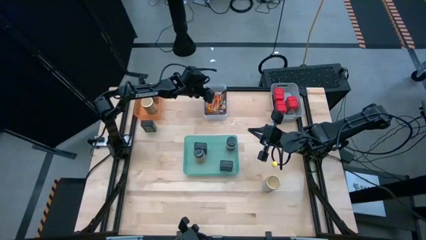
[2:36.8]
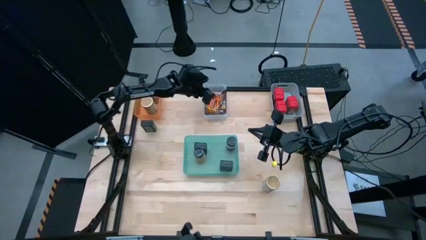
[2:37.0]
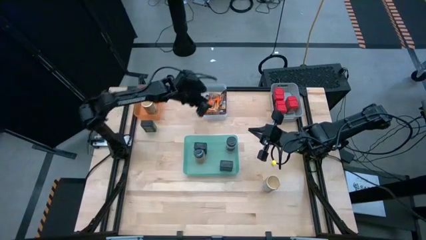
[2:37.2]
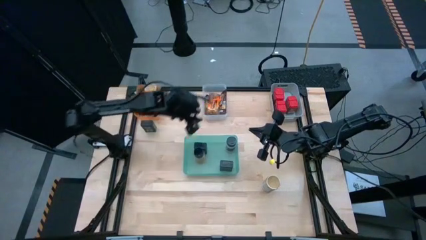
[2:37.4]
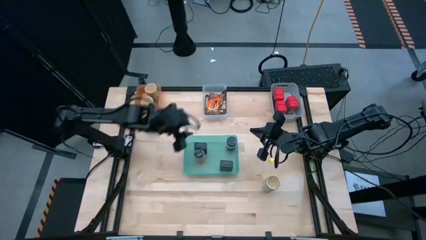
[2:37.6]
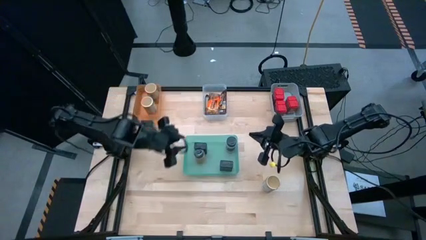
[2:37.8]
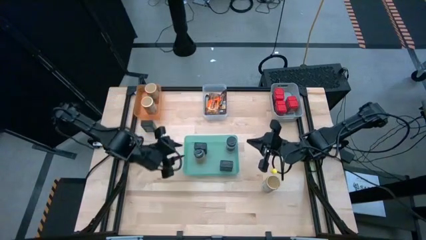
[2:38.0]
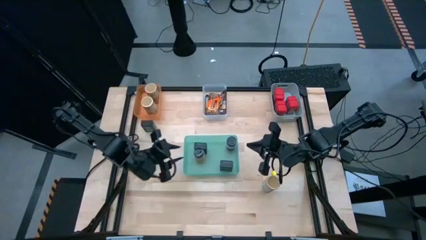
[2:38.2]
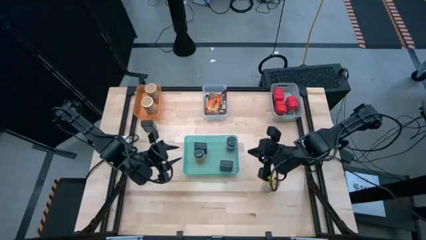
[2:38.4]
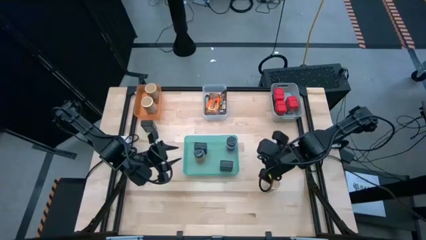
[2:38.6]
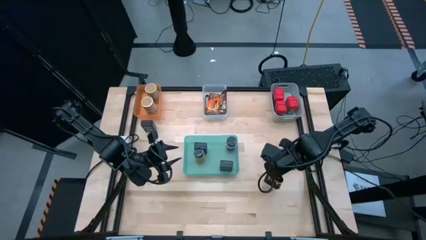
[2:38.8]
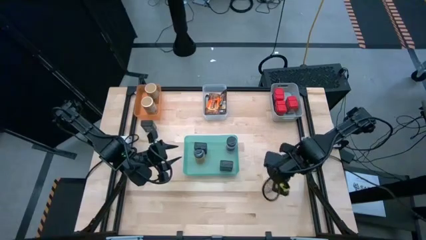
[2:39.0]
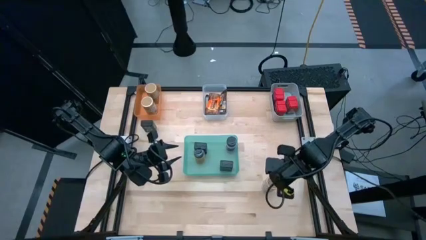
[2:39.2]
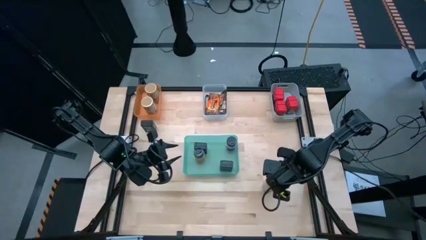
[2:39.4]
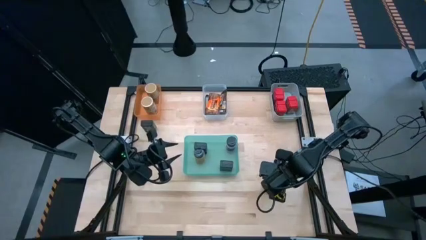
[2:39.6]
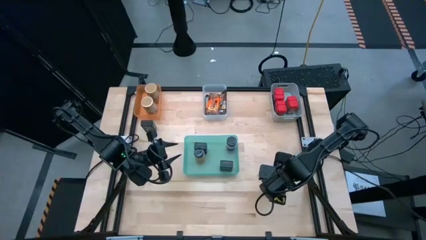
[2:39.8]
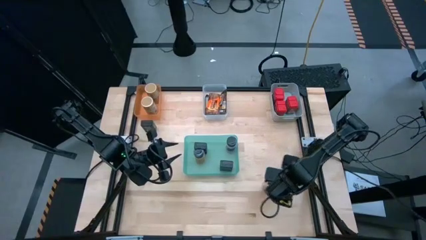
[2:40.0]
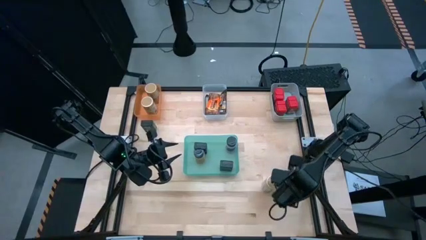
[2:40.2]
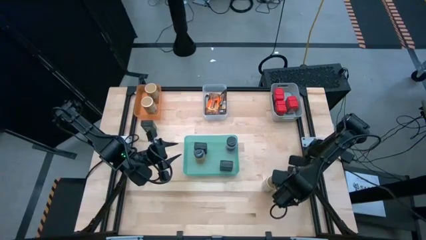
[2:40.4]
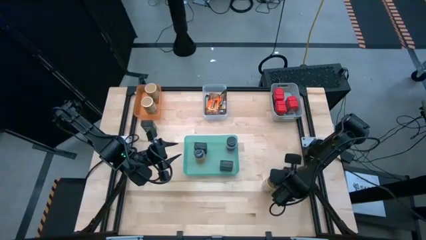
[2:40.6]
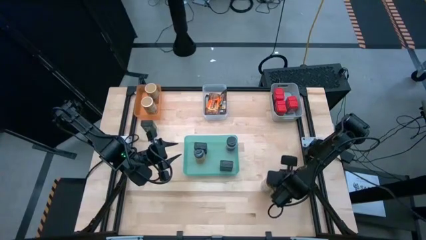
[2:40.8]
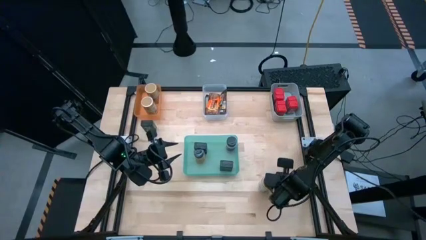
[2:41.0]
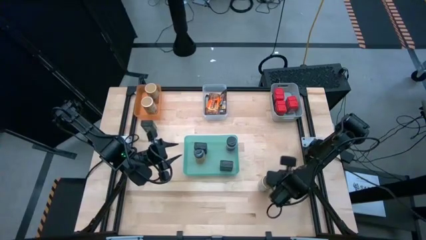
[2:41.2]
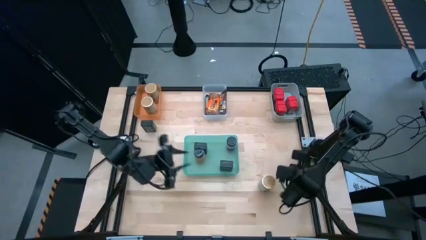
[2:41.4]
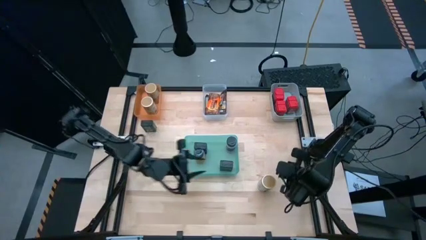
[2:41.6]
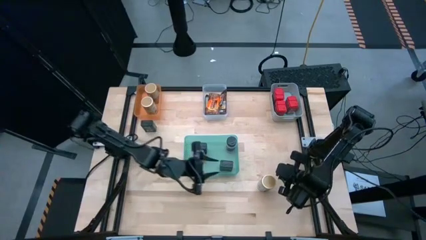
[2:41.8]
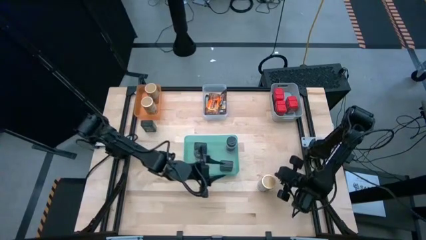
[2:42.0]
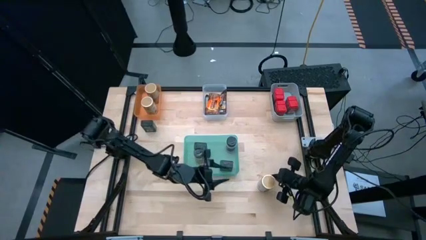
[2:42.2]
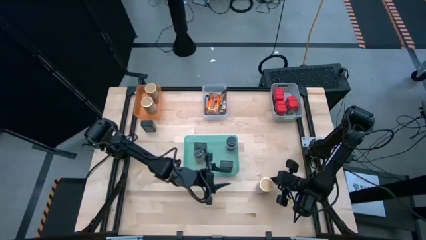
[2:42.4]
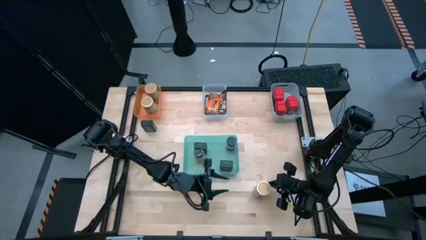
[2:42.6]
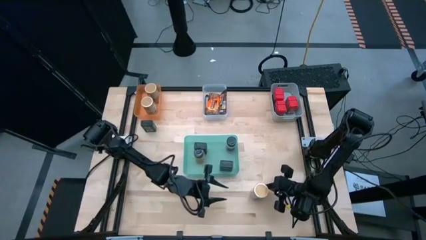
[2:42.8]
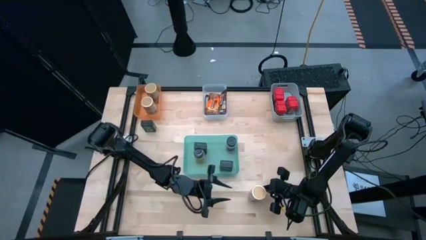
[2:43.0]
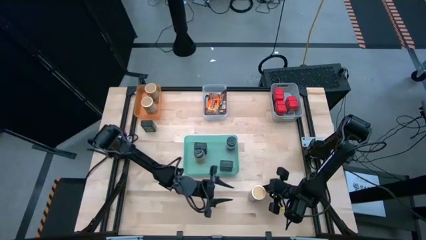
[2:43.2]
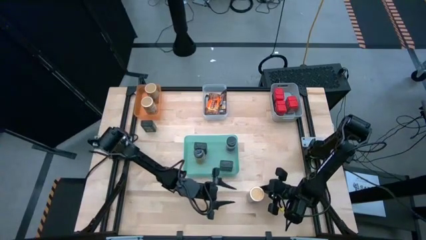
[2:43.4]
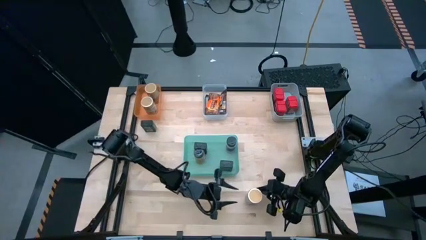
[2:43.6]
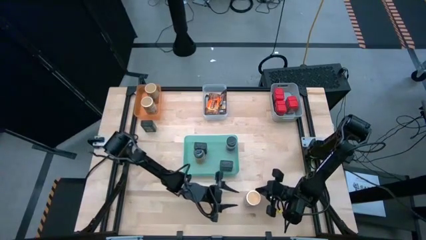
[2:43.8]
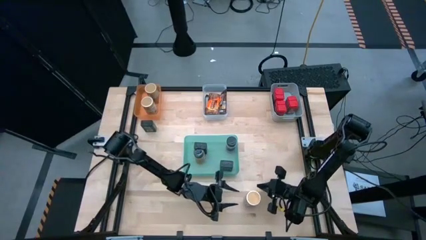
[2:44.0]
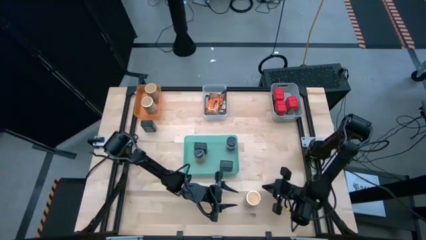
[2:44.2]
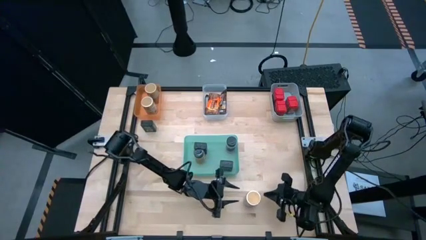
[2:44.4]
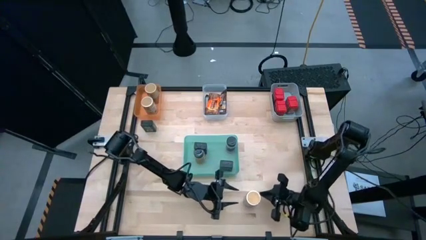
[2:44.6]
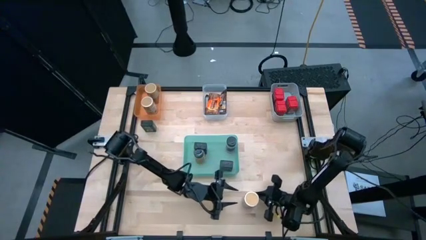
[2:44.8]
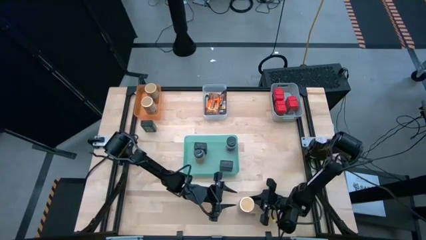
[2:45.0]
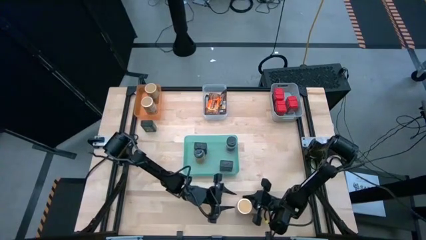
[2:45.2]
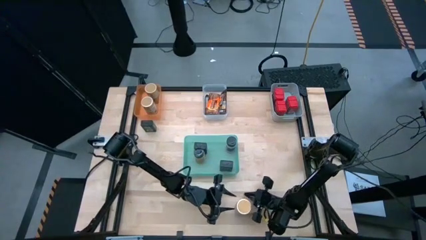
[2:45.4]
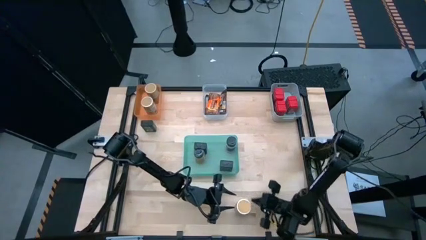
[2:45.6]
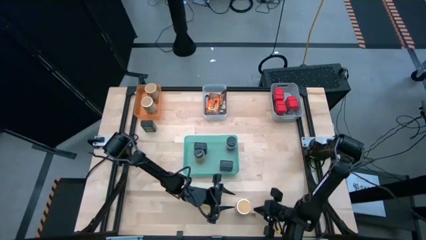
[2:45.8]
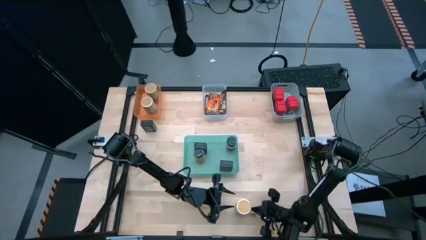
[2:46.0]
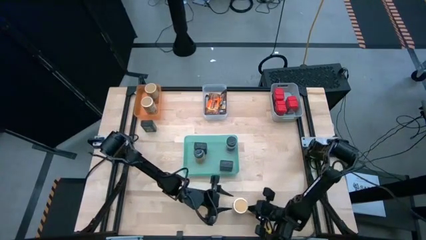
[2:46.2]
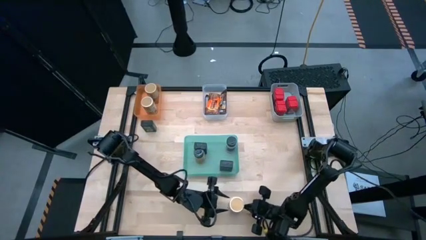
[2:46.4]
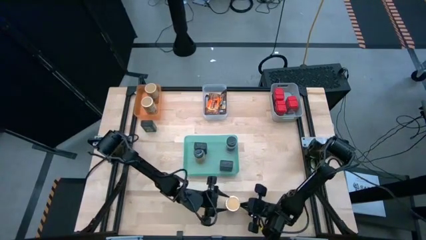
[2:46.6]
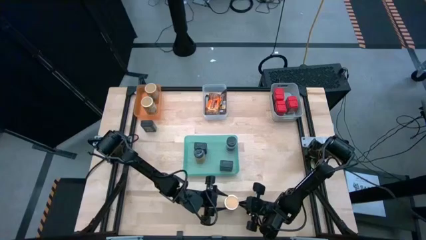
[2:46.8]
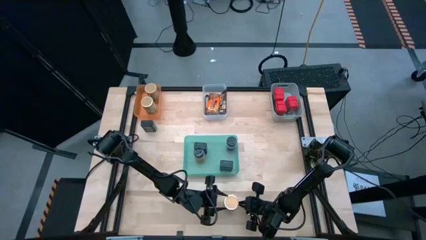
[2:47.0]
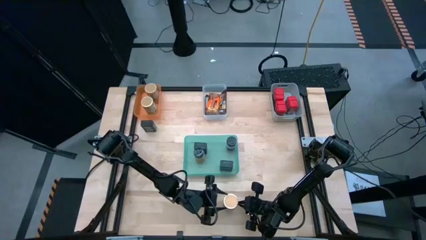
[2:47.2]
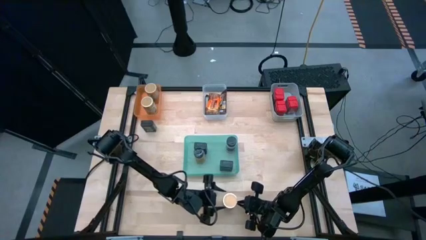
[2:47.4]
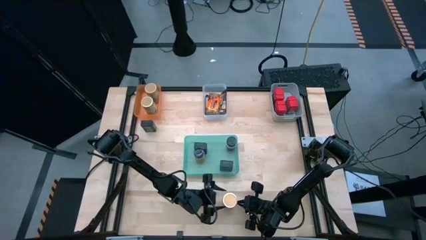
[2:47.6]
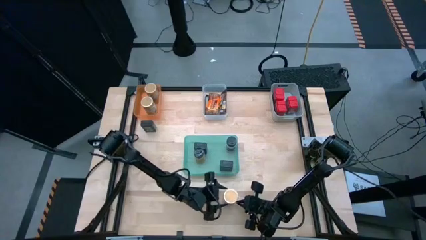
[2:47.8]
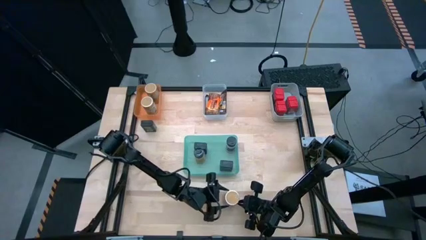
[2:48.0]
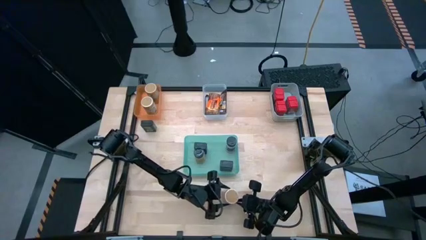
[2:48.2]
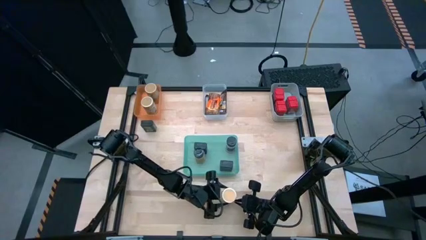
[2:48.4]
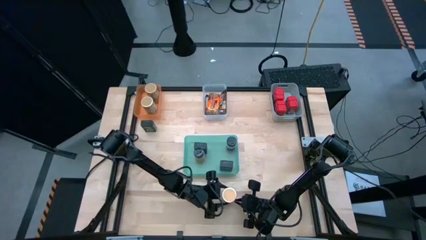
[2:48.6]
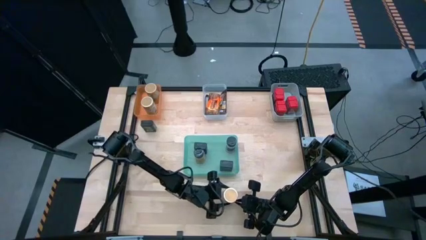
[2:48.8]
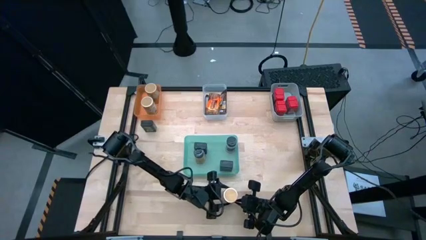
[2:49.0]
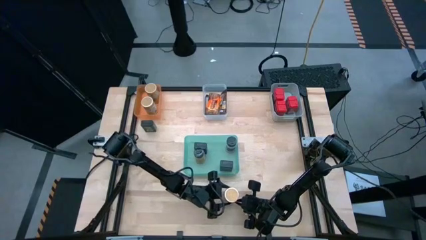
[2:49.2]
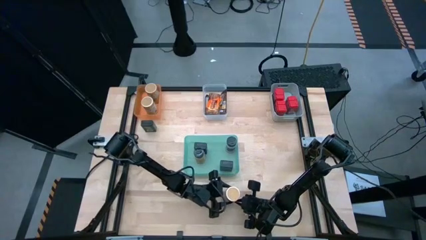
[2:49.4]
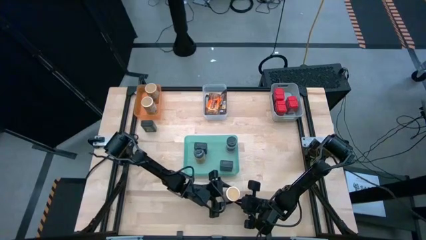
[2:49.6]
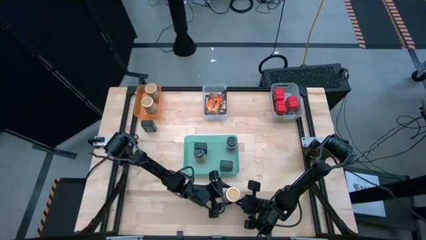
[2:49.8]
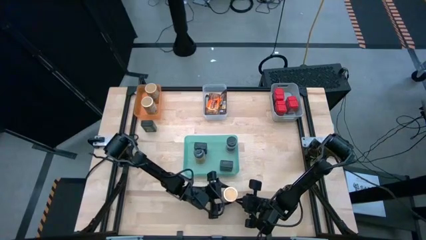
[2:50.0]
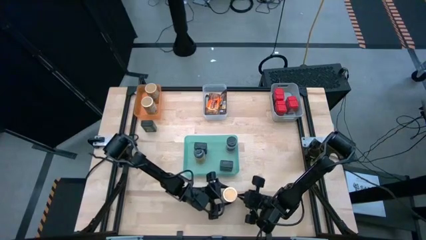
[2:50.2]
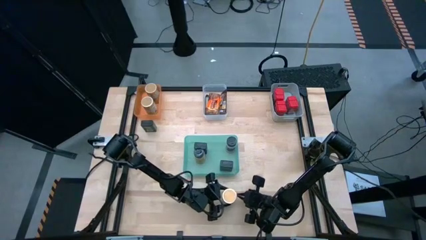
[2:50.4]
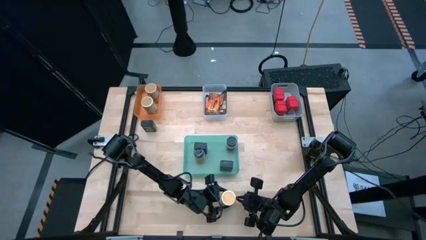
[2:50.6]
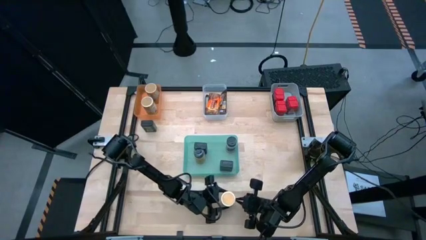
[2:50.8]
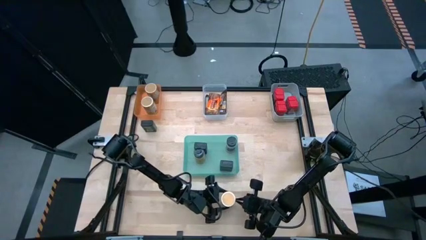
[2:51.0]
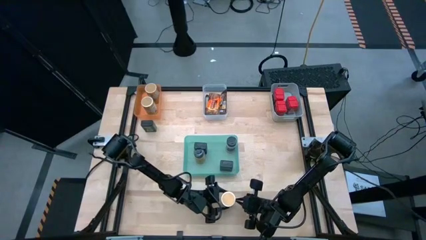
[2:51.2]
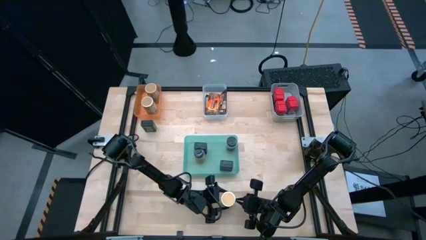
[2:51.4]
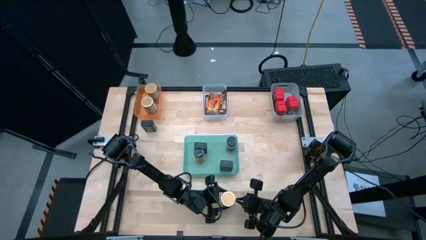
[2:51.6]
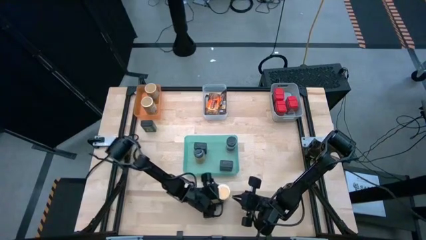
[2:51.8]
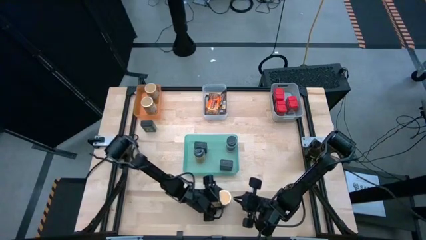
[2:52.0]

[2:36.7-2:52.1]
Task: Sort spices by type
Put the gold spice bottle into the orange bin

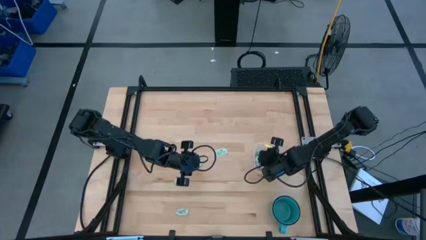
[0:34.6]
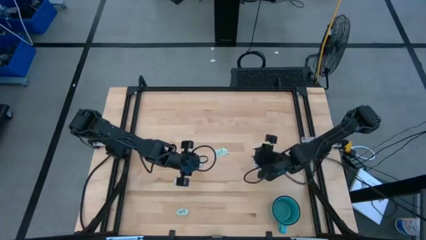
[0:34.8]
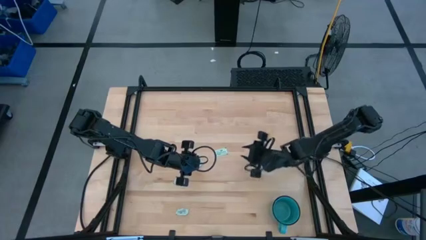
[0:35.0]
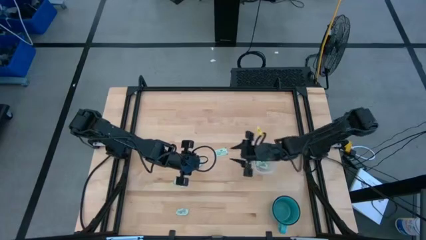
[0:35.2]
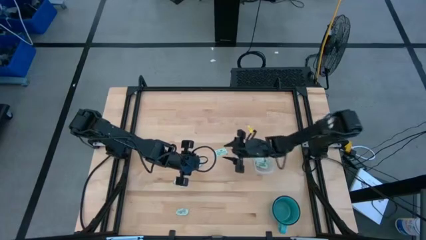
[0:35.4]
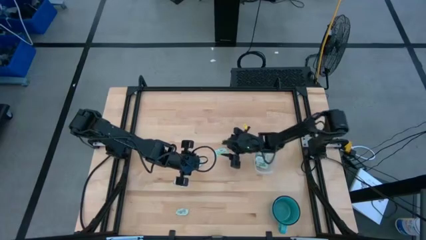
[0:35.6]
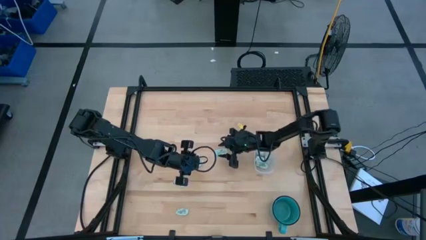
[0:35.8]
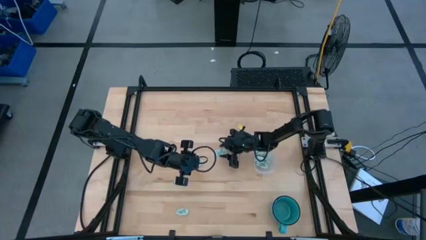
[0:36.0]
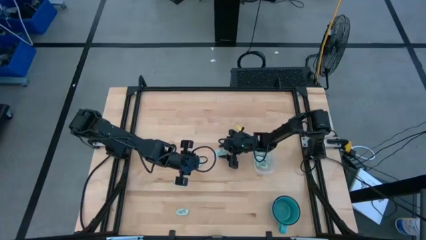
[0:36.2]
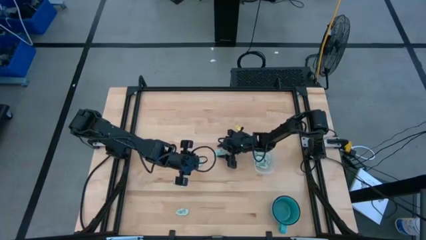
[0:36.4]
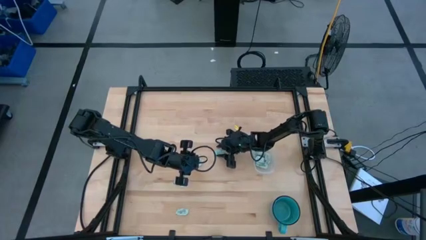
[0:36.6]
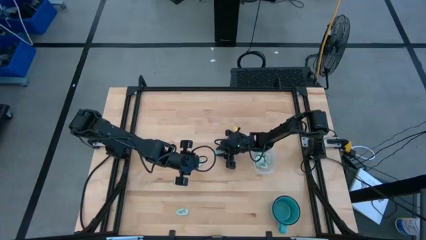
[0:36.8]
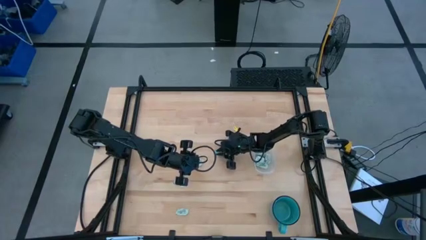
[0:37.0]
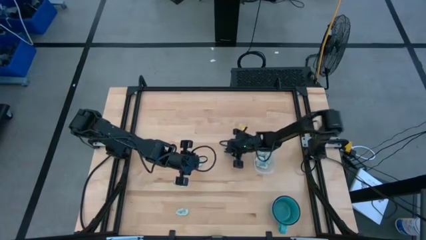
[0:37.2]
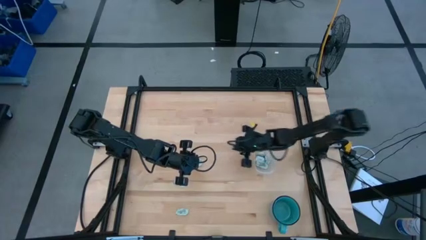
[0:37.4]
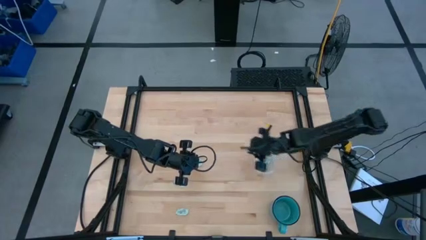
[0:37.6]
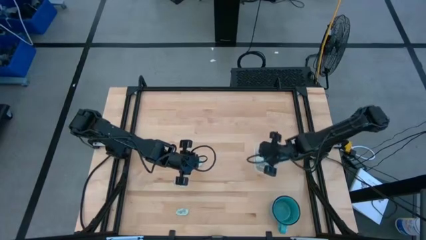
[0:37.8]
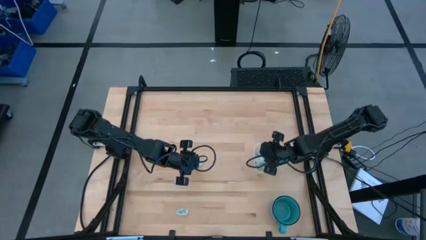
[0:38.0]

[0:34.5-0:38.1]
Task: Pick and place Stevia / Truvia into bins
Put the stevia packet into the bin
